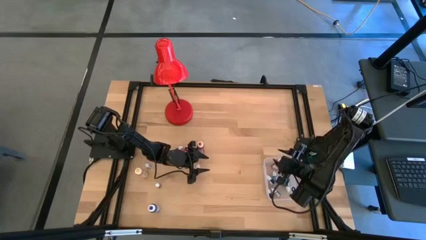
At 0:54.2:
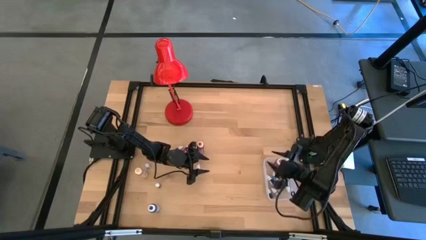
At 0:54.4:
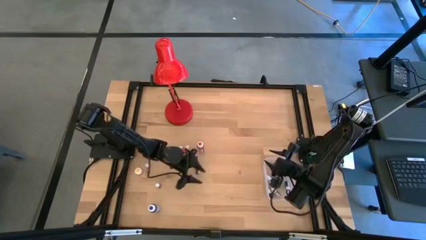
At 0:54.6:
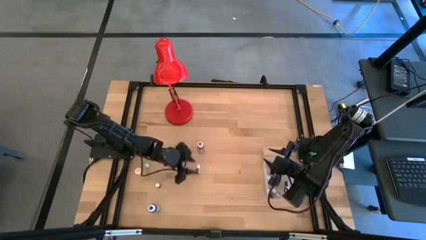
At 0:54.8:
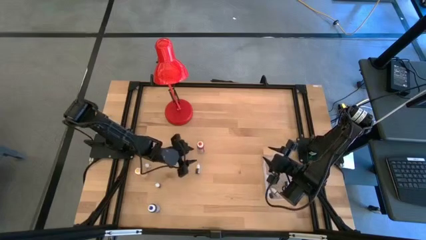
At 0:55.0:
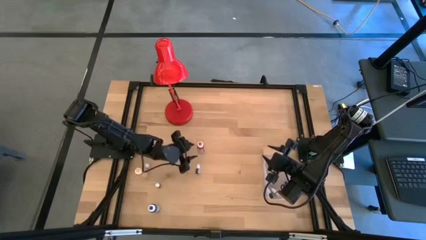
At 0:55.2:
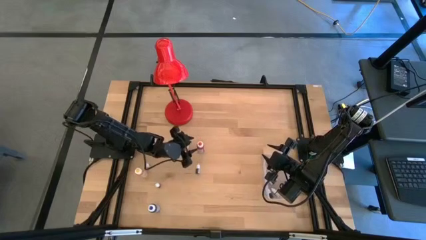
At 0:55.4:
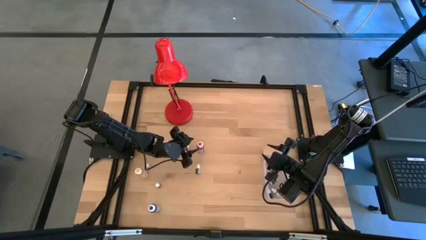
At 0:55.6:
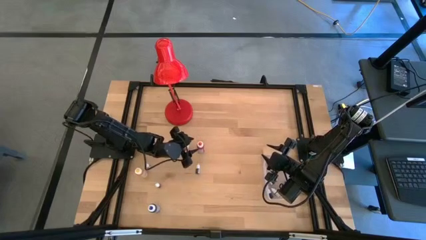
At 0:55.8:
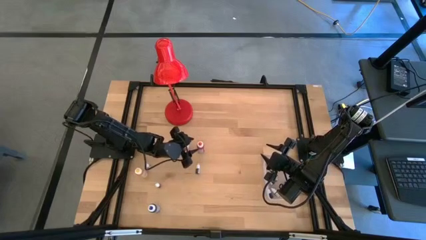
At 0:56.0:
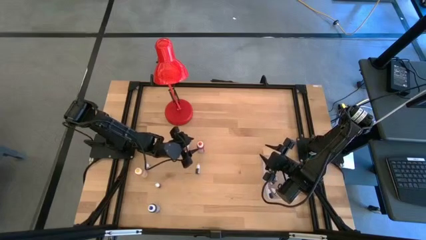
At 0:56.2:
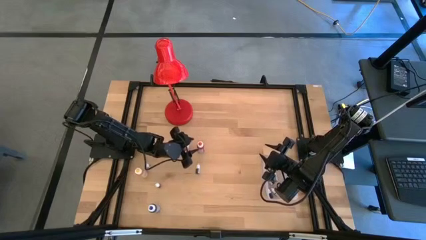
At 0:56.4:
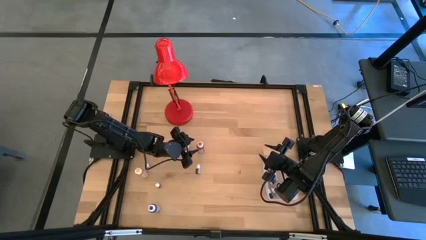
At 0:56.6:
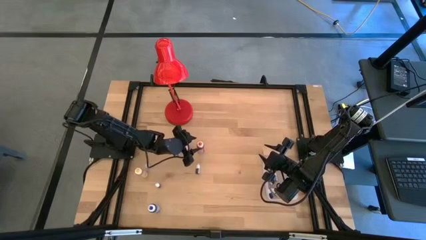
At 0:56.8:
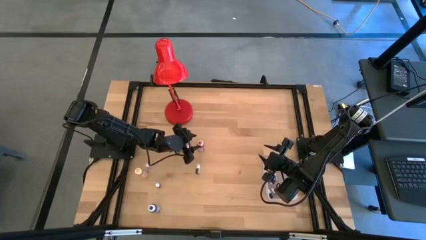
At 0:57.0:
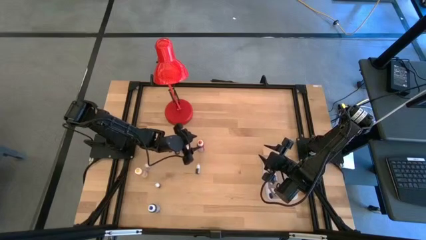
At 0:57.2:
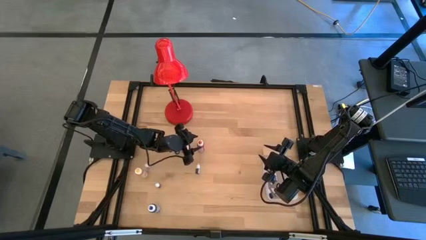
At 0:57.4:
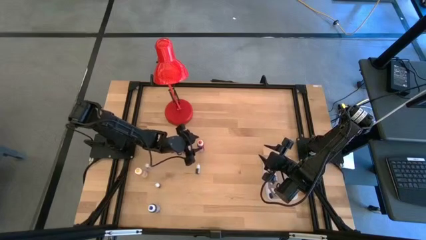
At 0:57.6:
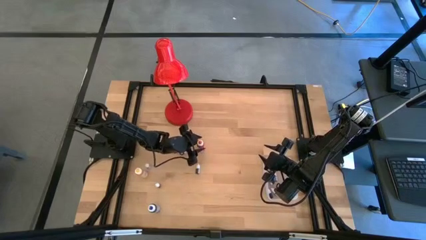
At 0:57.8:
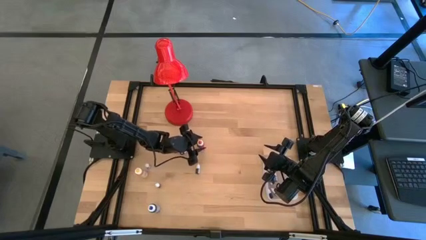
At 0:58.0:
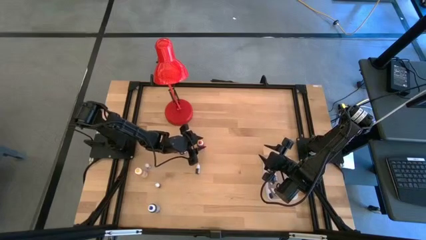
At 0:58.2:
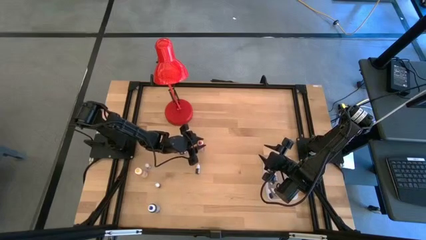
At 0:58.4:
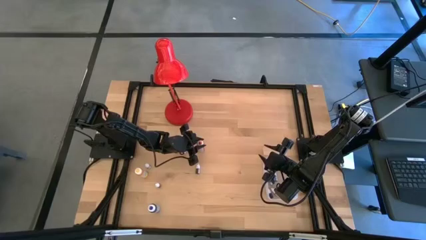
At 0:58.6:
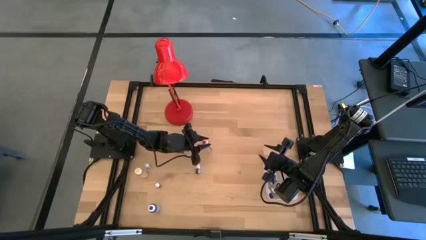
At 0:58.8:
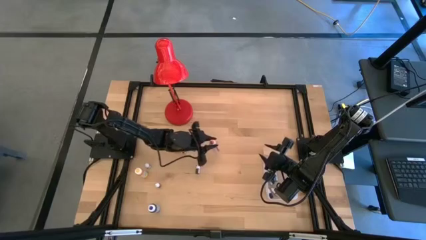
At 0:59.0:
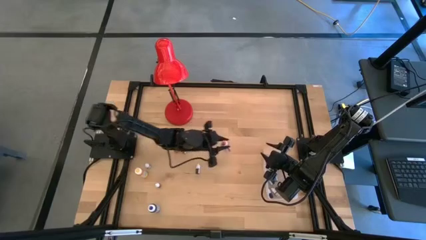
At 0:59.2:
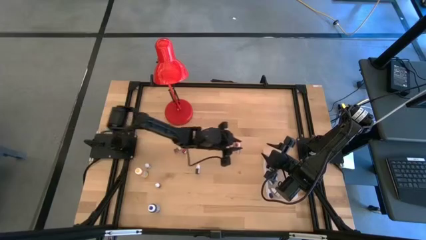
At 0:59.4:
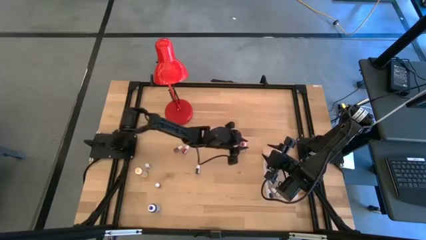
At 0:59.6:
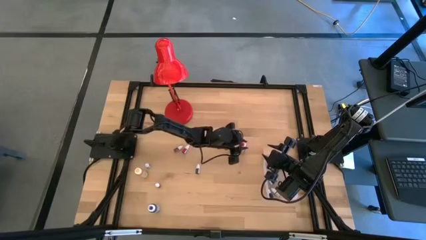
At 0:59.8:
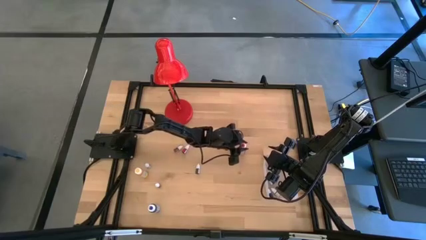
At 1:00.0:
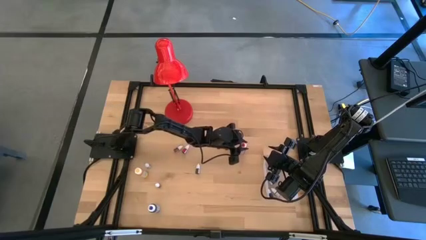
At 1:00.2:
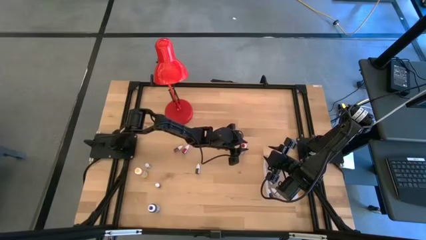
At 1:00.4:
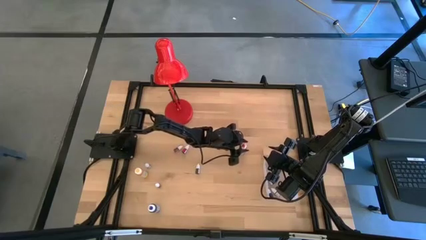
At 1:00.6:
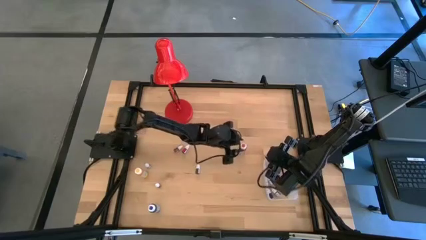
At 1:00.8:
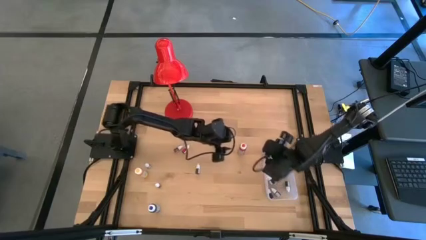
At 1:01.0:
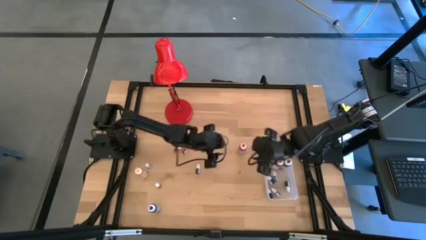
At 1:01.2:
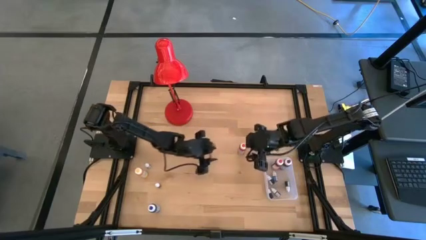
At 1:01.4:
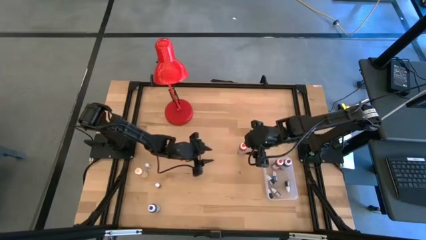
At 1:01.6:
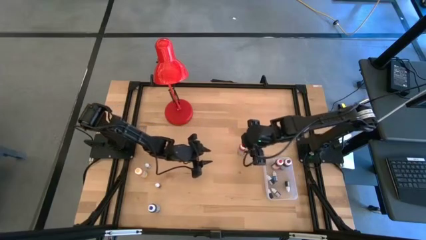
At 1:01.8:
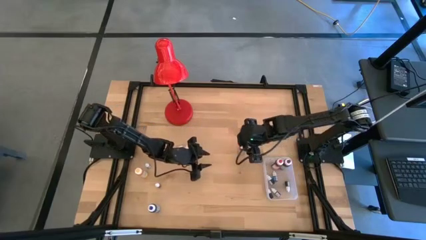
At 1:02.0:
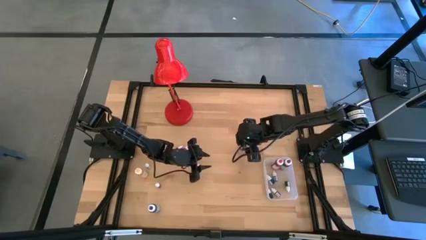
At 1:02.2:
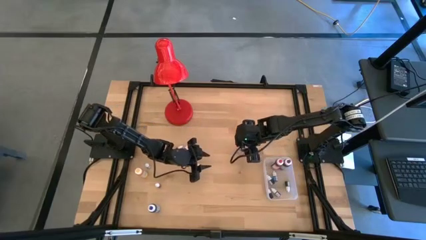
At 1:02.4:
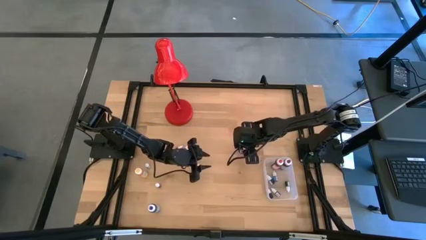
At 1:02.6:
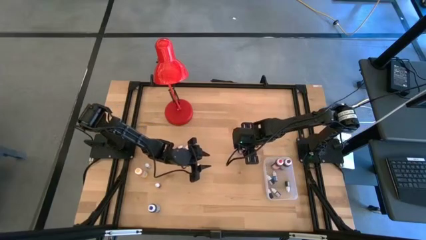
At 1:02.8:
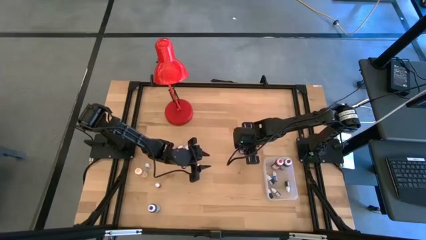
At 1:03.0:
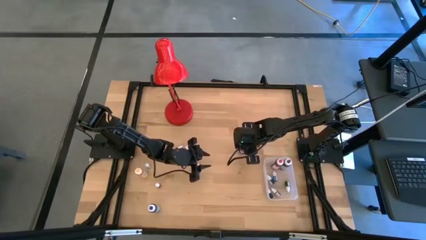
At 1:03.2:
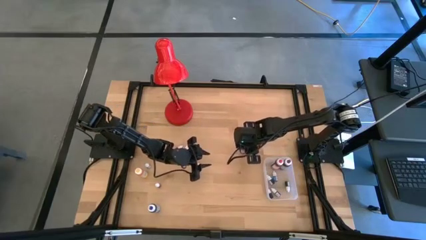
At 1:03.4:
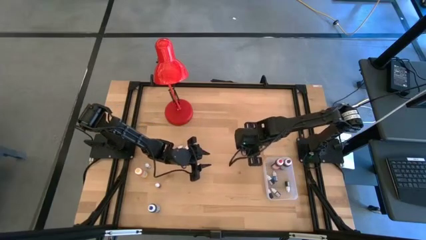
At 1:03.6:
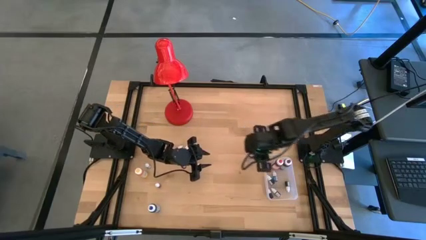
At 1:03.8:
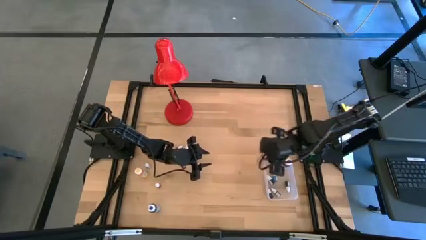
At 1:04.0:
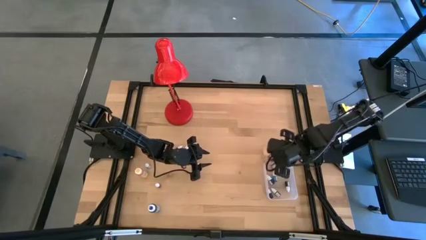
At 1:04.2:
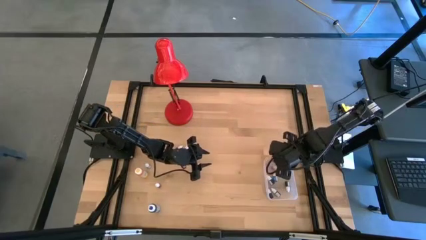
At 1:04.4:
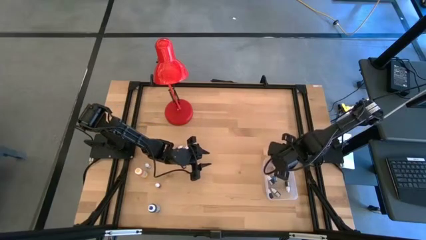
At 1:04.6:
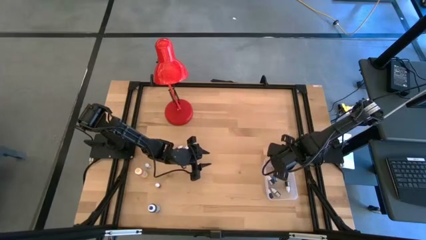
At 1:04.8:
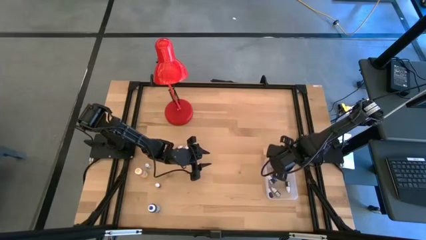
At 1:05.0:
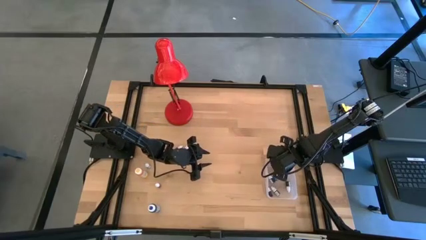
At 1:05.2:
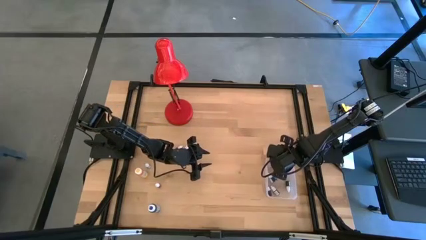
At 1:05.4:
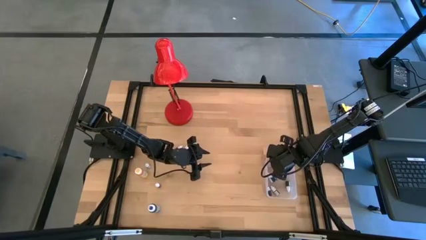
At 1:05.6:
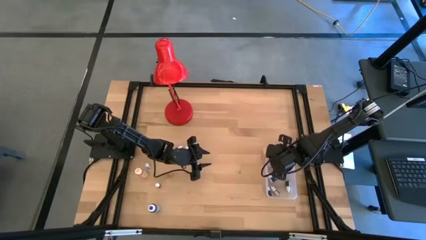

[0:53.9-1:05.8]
Task: Pick & Place food coloring
Put the big orange bottle into the transparent container

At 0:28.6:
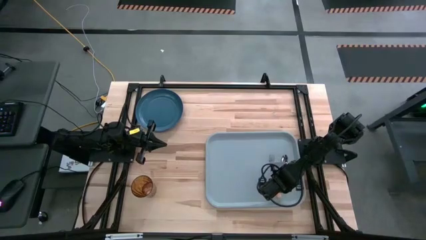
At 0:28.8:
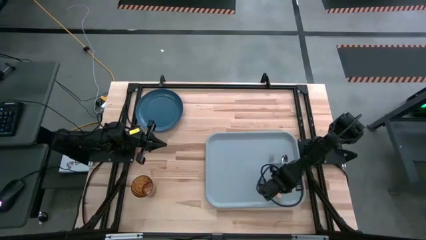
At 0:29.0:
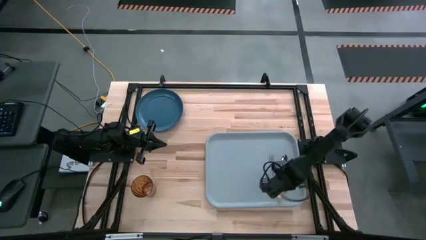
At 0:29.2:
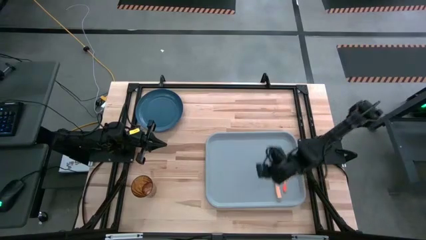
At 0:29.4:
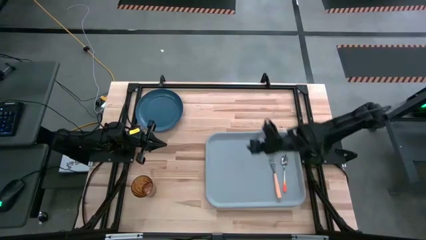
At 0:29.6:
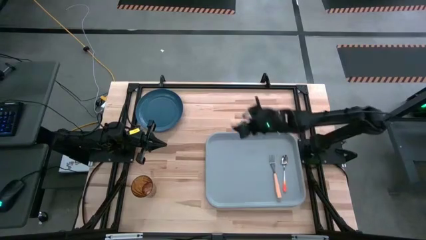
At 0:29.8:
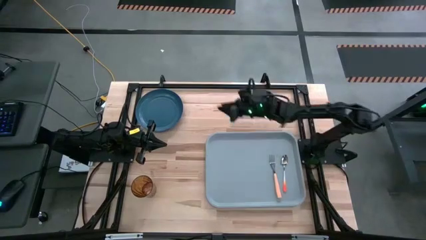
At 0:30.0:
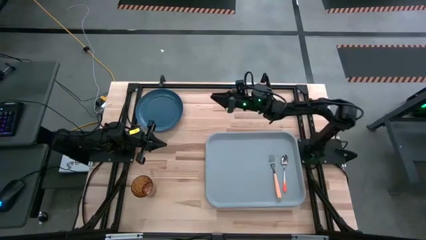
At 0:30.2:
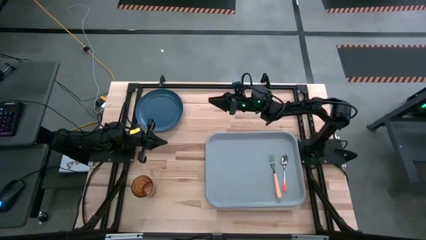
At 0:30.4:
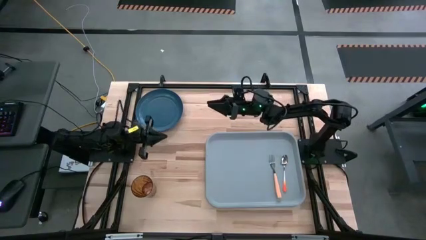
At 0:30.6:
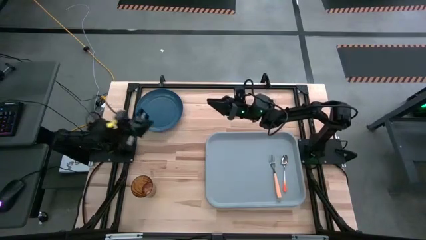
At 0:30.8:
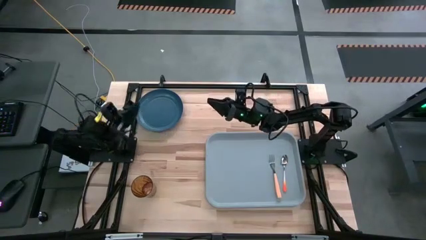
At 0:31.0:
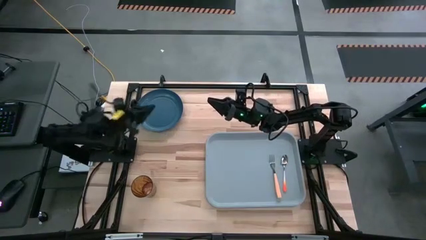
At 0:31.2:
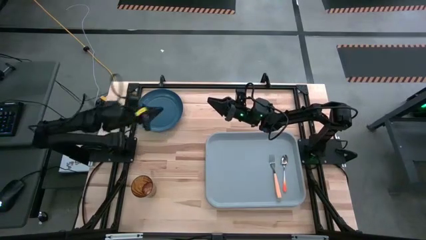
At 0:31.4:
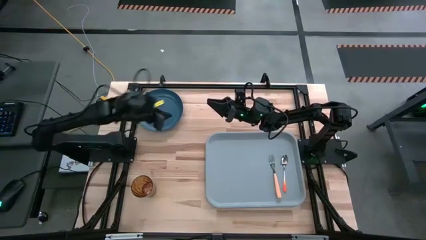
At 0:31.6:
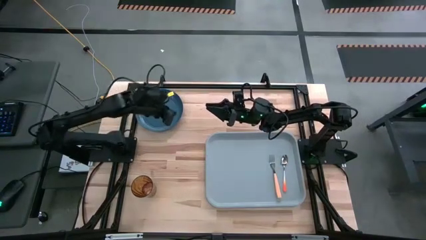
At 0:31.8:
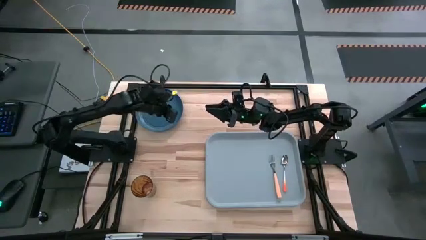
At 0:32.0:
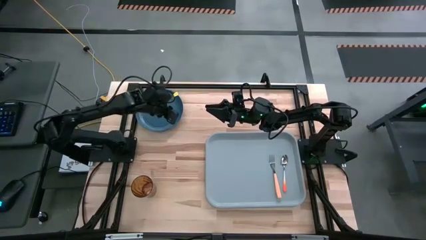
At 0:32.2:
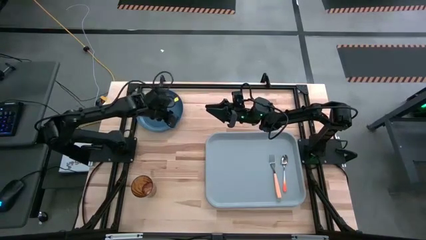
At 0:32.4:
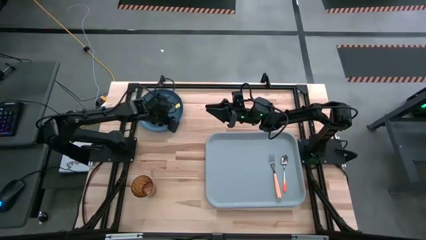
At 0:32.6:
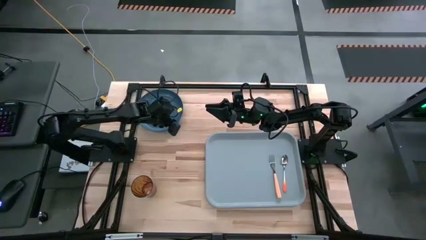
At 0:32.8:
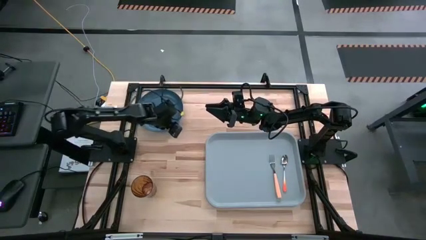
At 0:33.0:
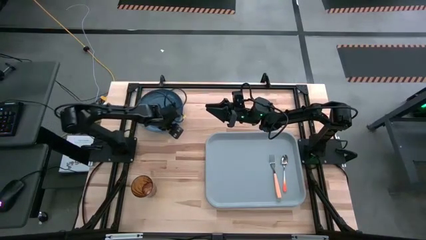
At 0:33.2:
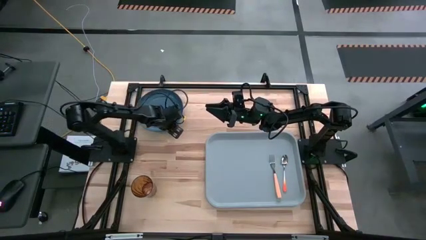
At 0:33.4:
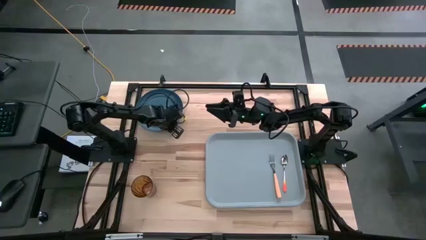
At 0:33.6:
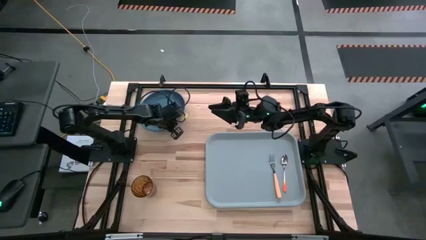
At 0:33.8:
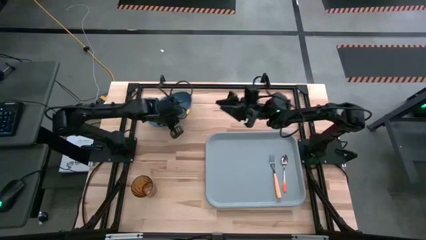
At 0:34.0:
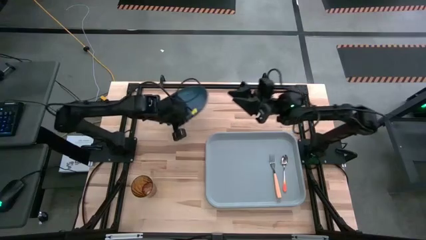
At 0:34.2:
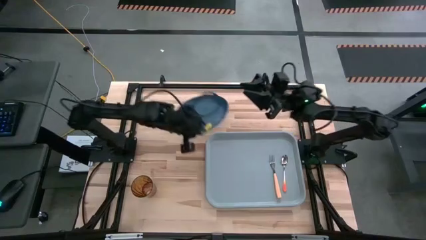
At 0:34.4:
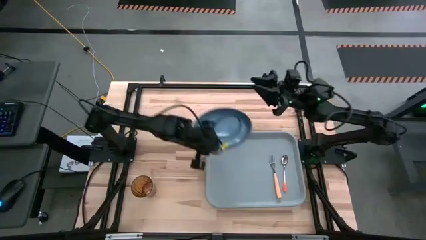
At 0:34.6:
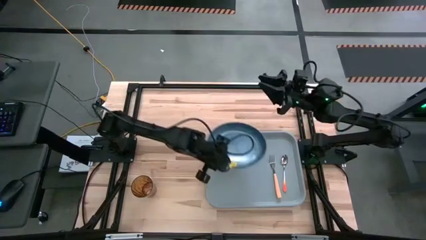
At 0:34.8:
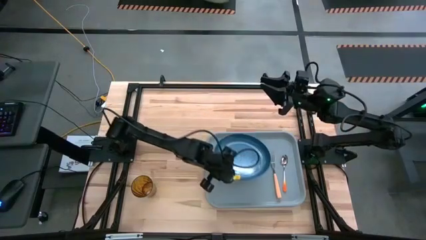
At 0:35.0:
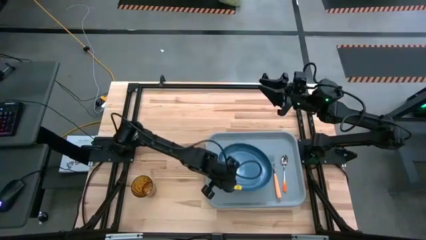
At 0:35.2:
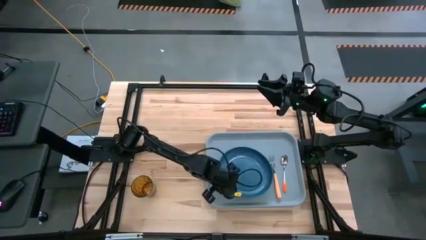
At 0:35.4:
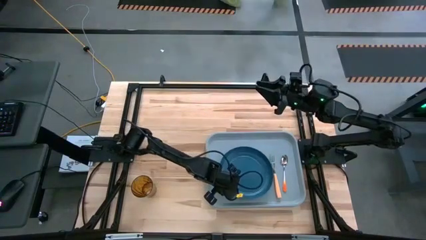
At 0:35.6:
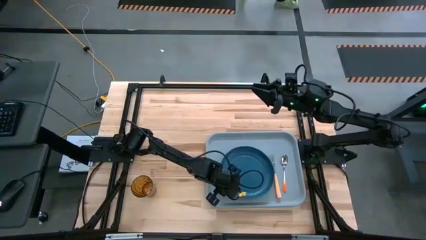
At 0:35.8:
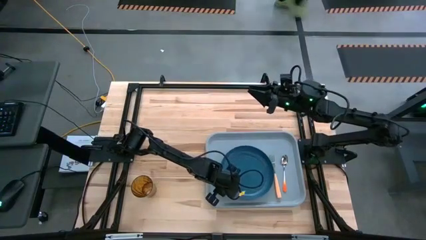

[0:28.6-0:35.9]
Task: Pick and place plate/cup/fork/spoon on tray
Put the blue plate to the left of the light orange fork on the gray tray
